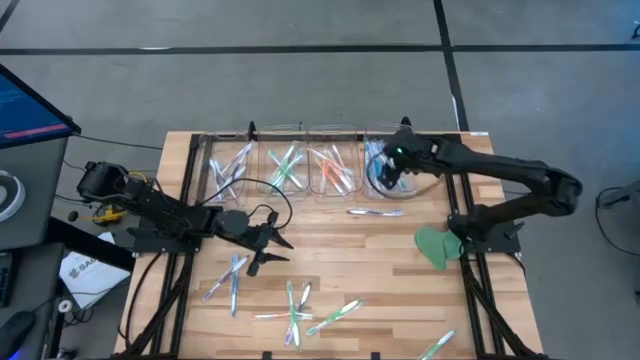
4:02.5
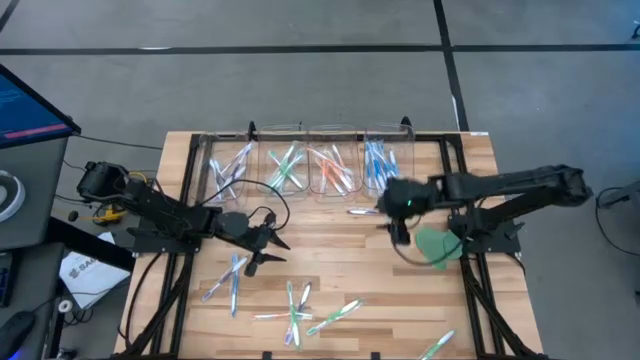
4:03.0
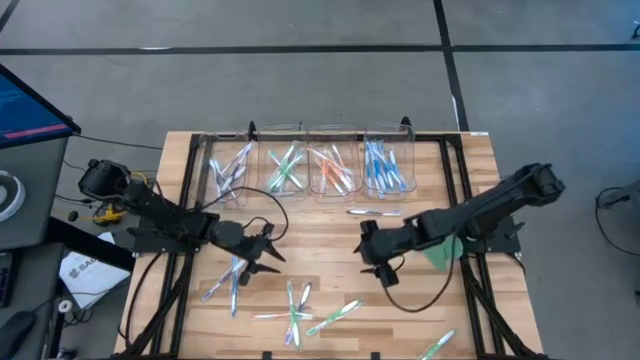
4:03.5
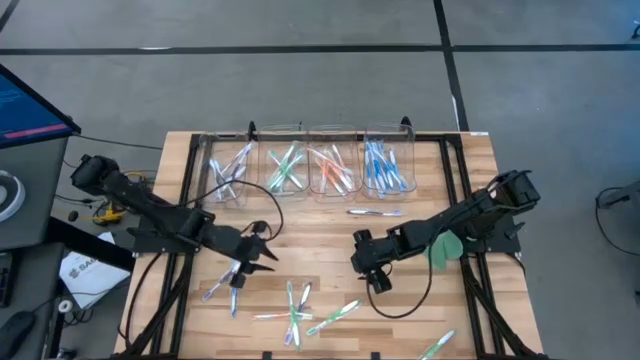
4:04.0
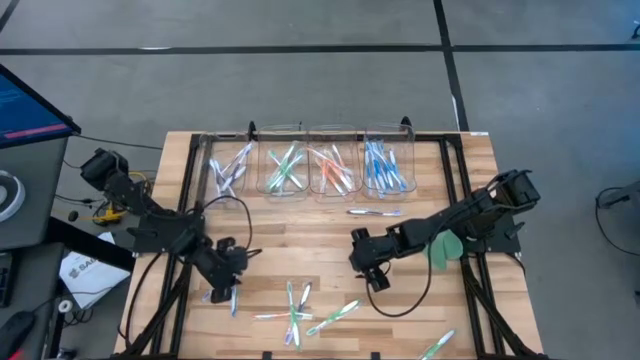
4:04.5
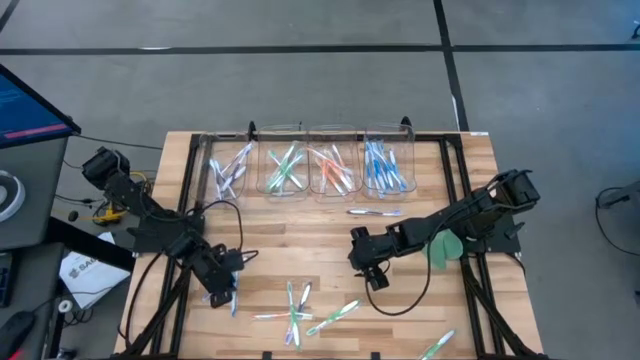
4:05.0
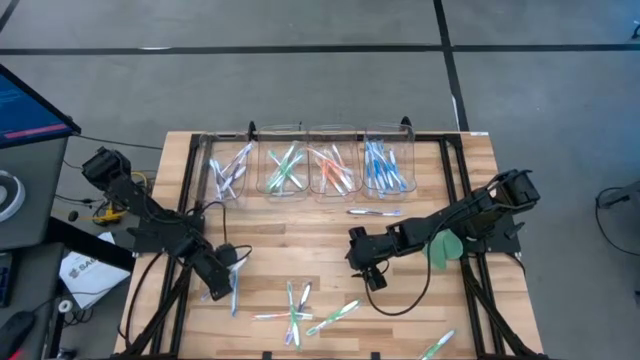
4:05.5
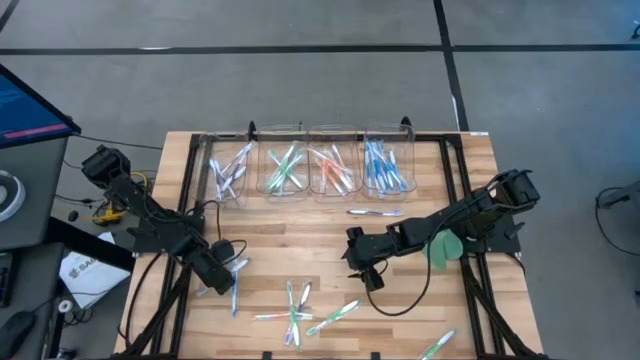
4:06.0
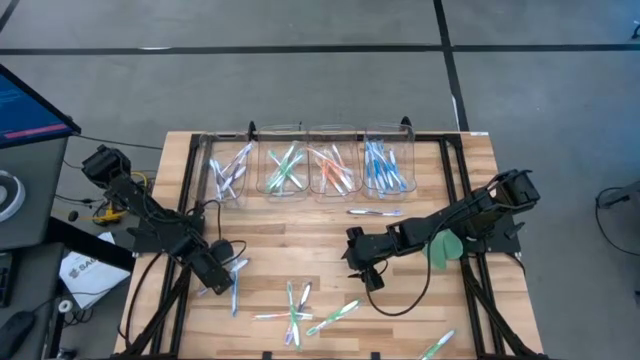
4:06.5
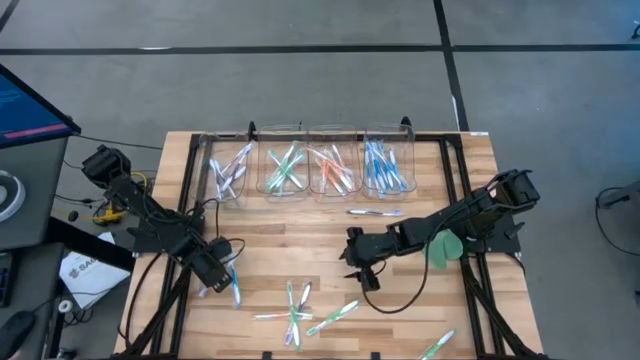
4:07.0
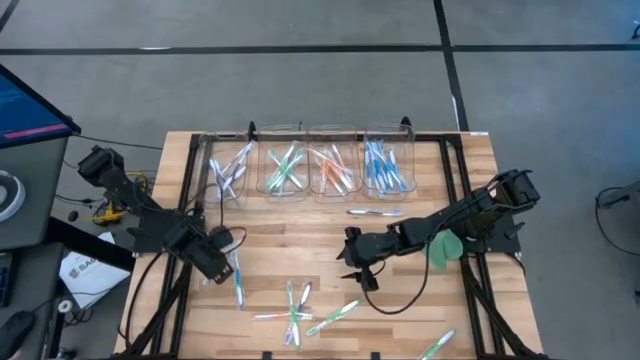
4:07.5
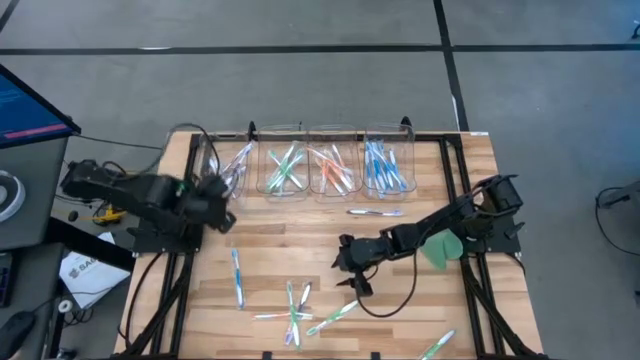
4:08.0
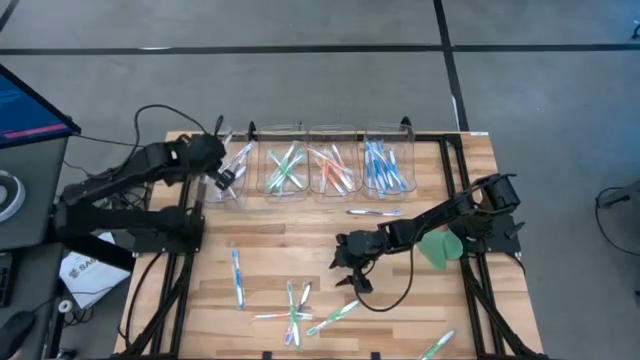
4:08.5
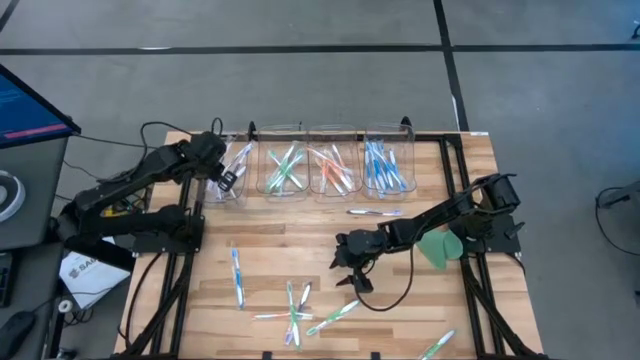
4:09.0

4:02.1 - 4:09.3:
Task: Pick & Place Toothbrushes
Put the violet toothbrush into the left transparent bin

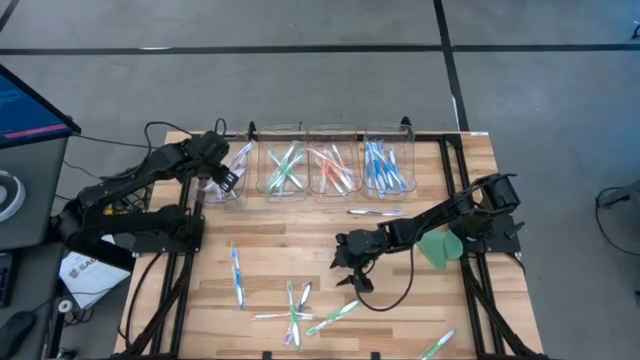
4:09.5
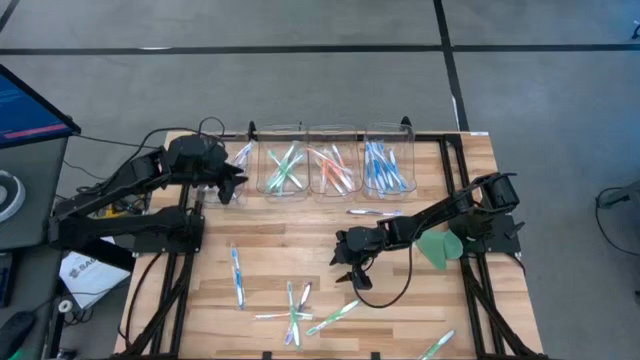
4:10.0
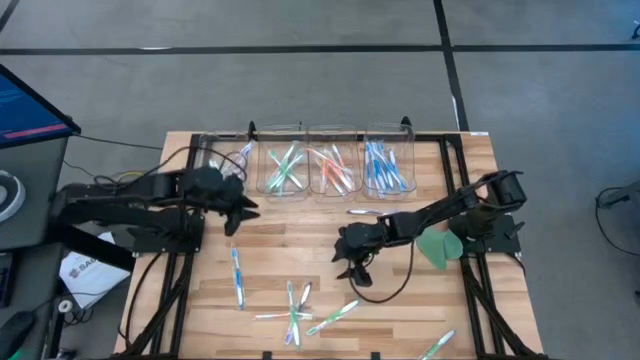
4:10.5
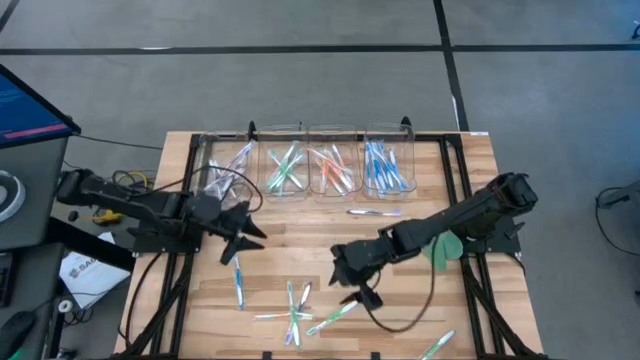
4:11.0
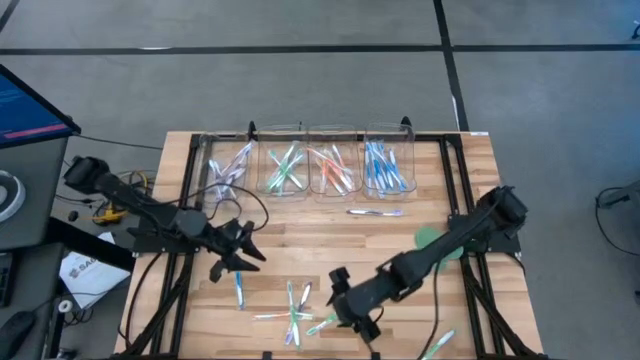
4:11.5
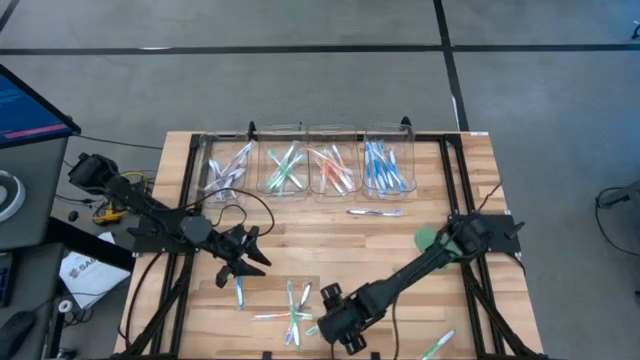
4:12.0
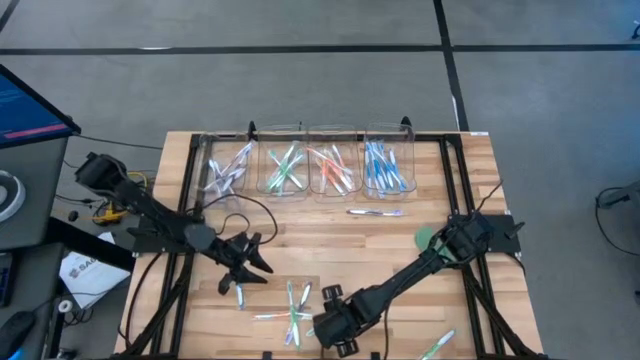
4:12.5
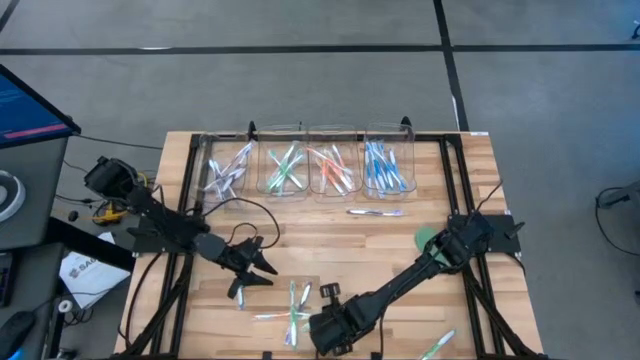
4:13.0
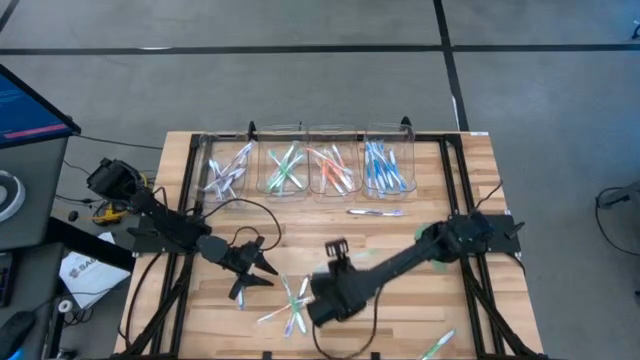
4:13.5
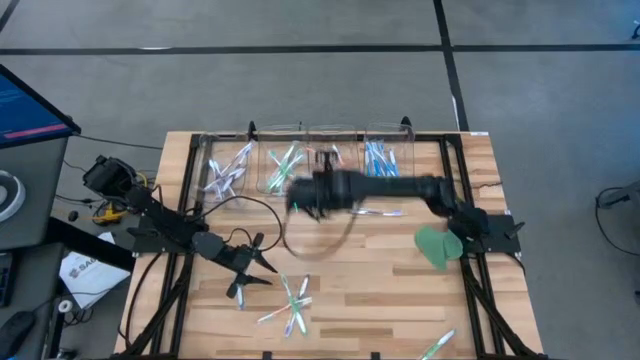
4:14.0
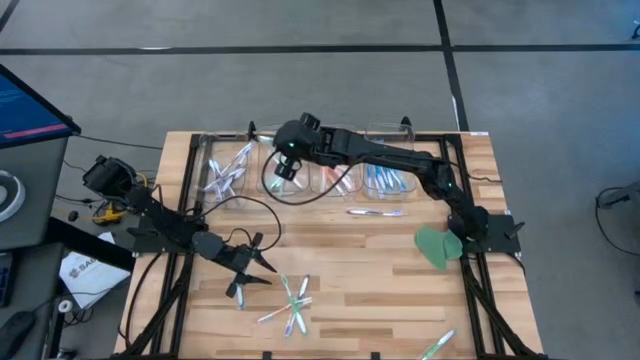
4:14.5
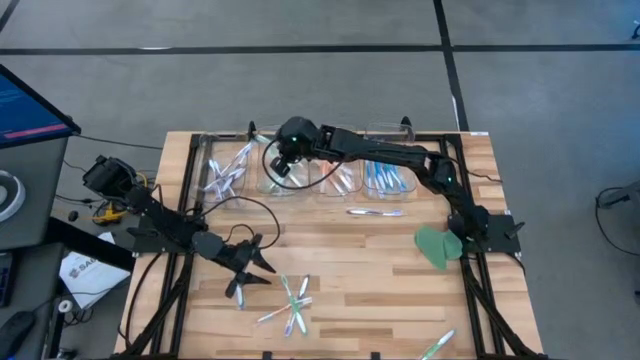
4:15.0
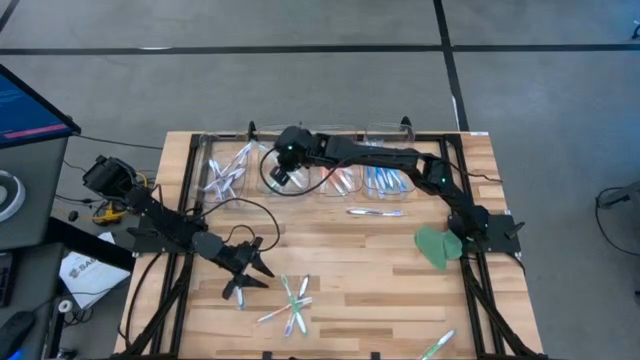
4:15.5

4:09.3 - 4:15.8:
Put the green toothbrush into the middle left transparent bin

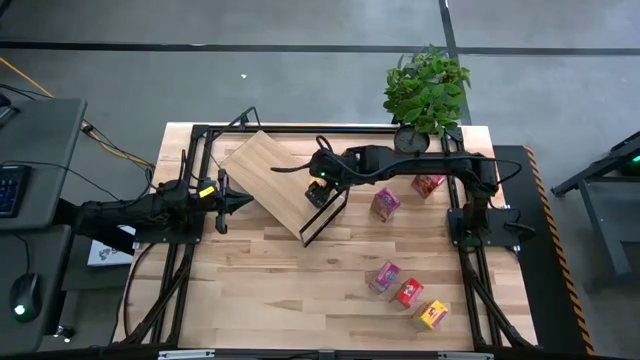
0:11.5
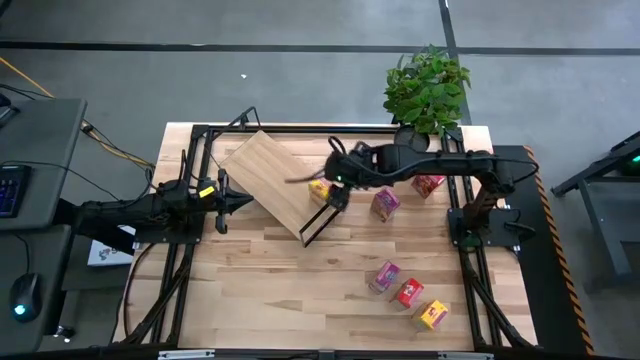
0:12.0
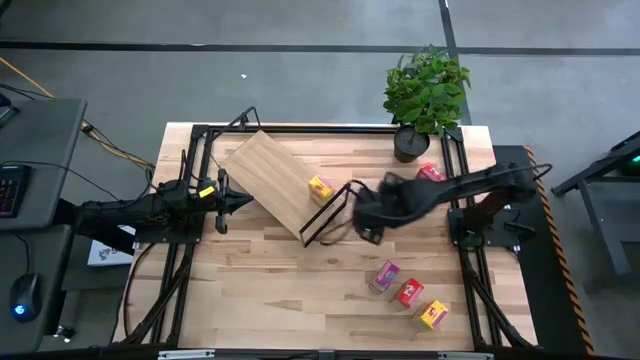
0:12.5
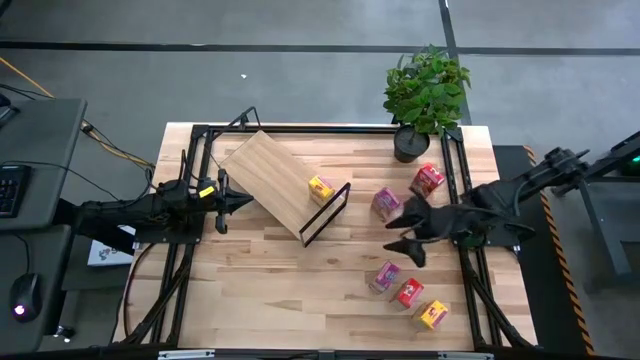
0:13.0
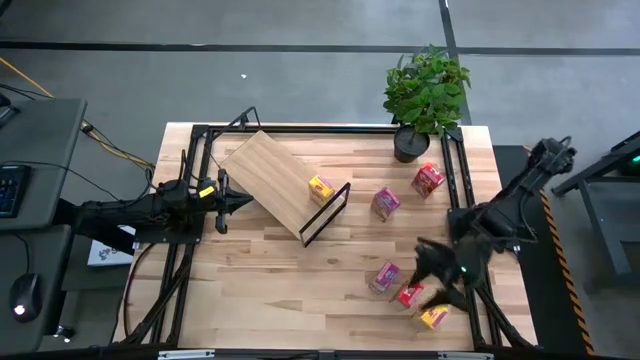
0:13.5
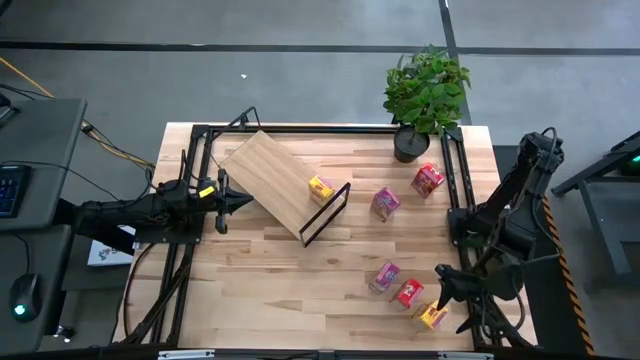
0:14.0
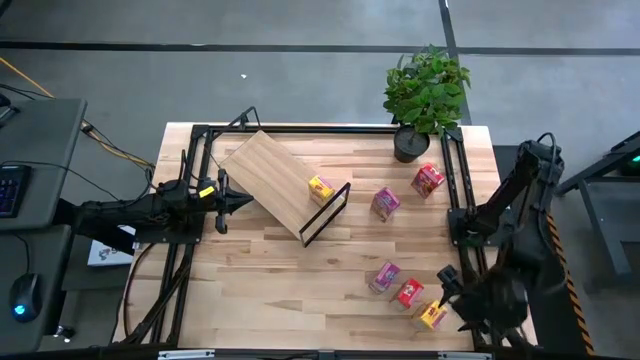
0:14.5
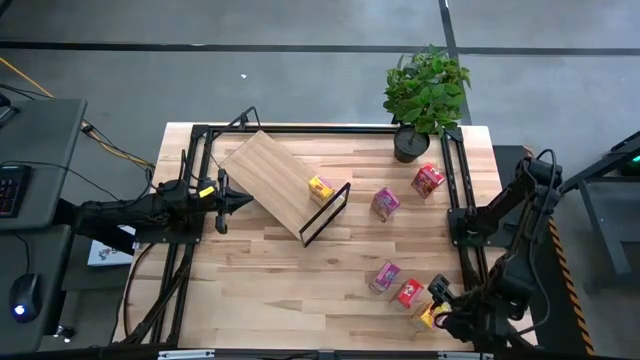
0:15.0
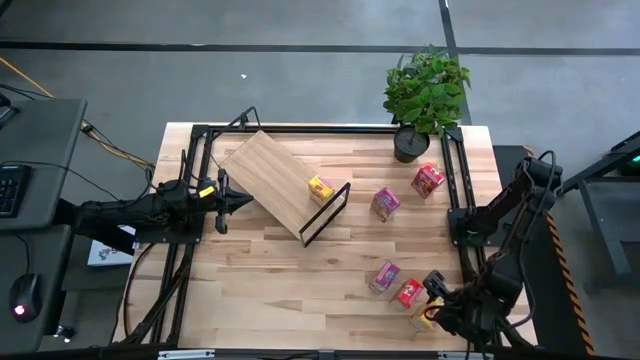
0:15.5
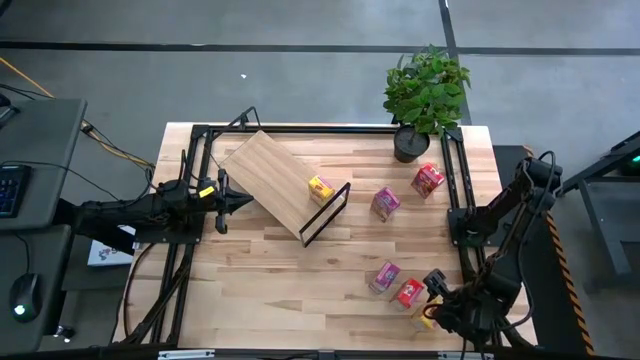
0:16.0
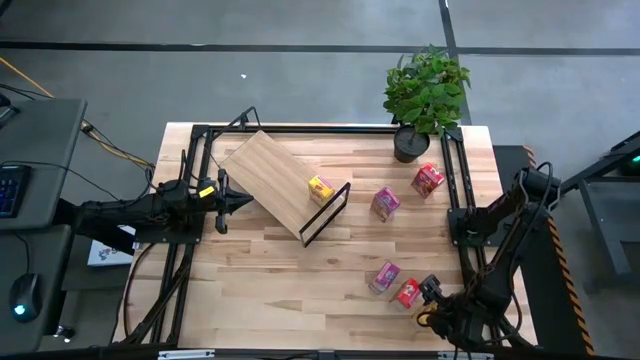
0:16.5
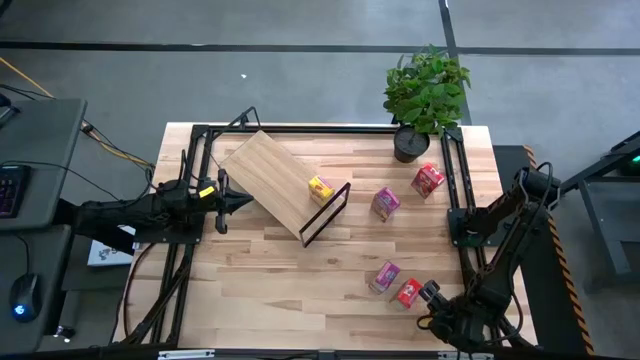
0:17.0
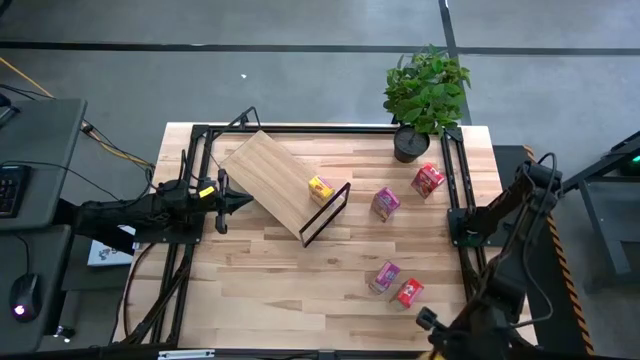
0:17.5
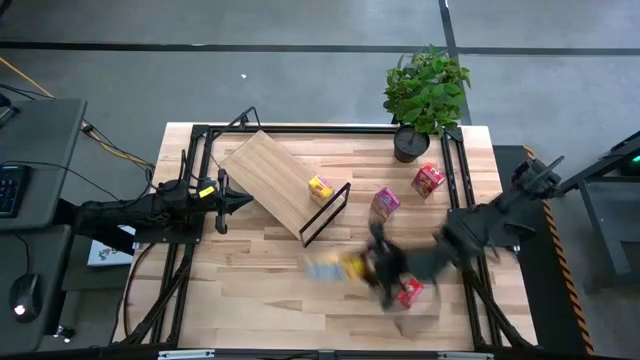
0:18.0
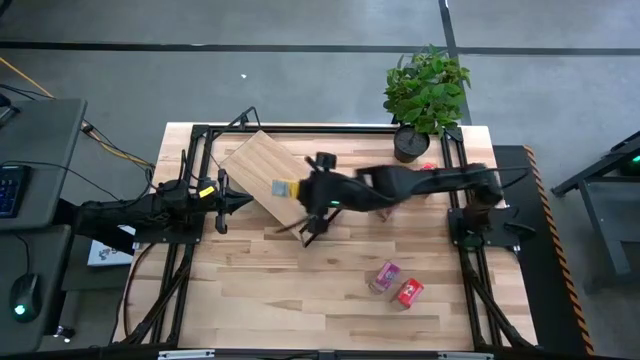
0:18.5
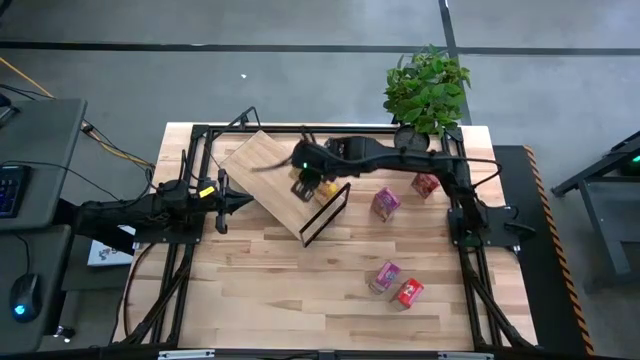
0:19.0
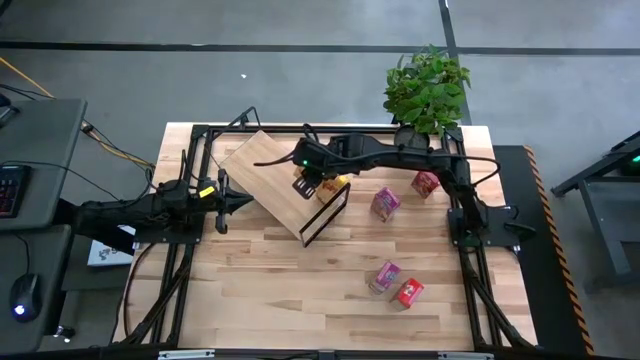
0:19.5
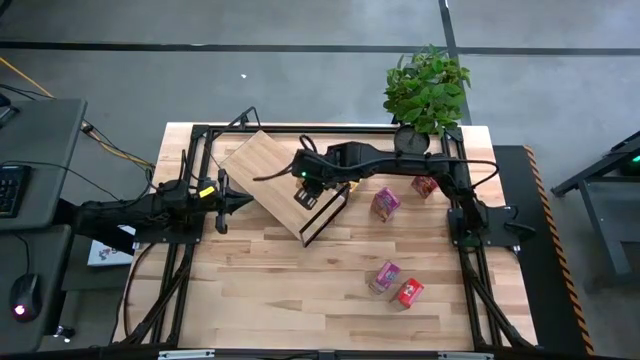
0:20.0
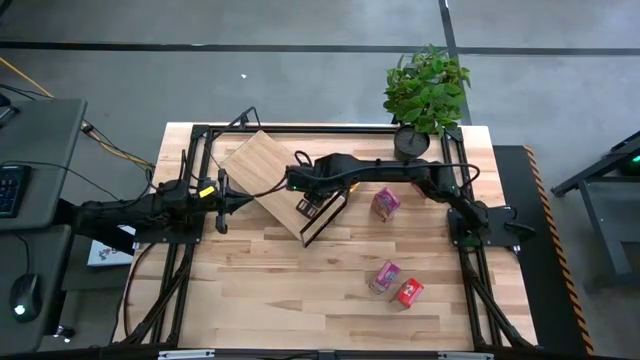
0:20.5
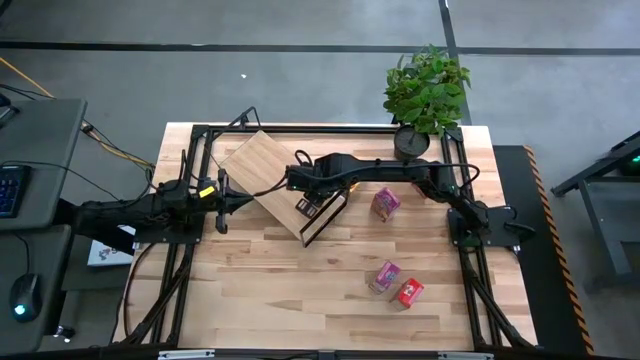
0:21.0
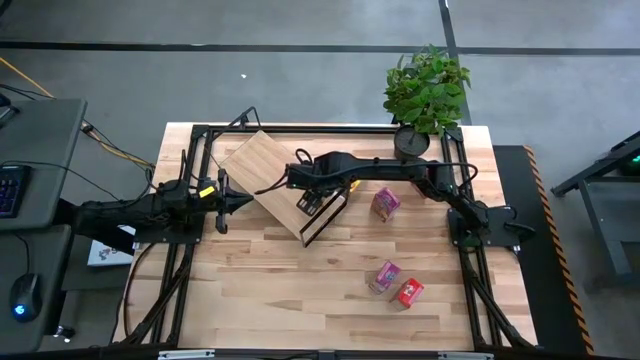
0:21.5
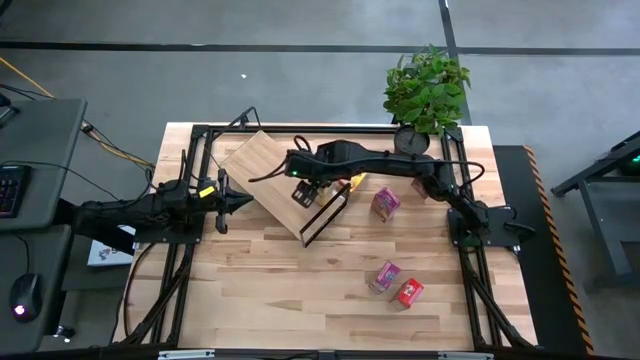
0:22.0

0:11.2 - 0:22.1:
Task: Stack cereal on shelf
Put the yellow cereal box on the shelf aligned with the other yellow cereal box
